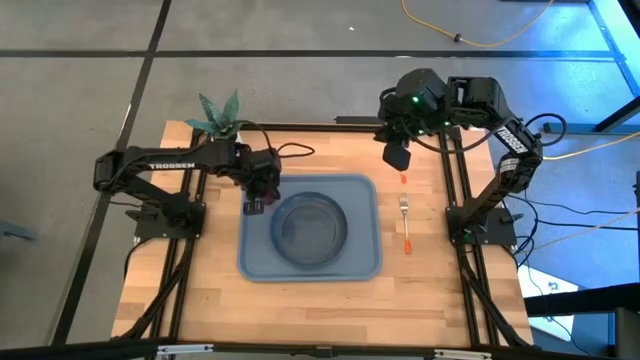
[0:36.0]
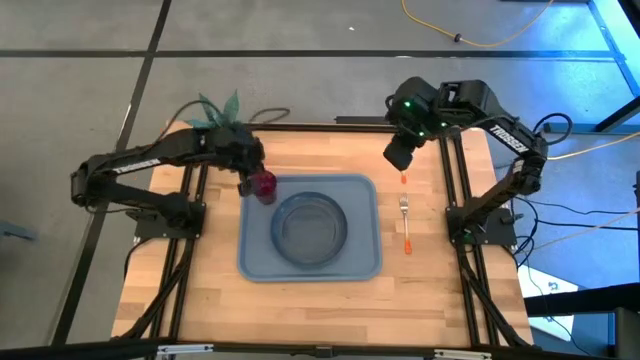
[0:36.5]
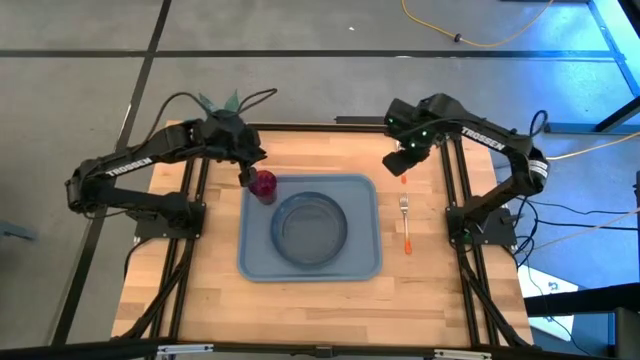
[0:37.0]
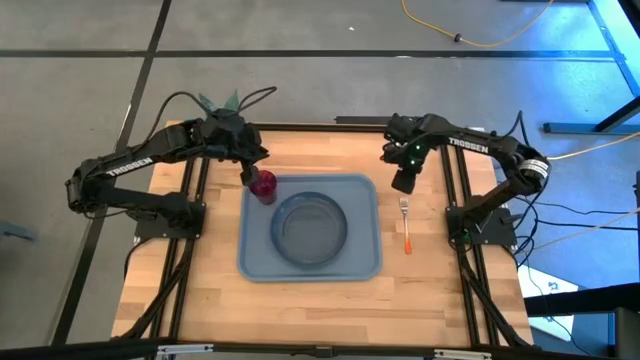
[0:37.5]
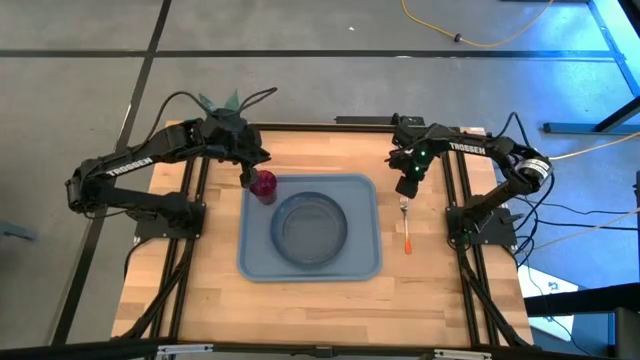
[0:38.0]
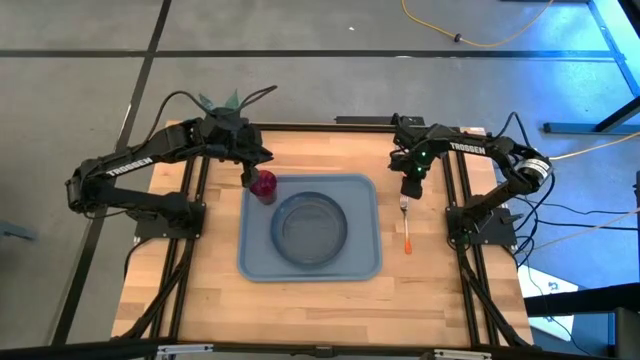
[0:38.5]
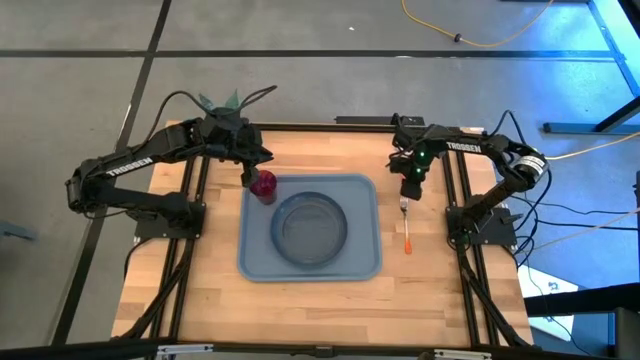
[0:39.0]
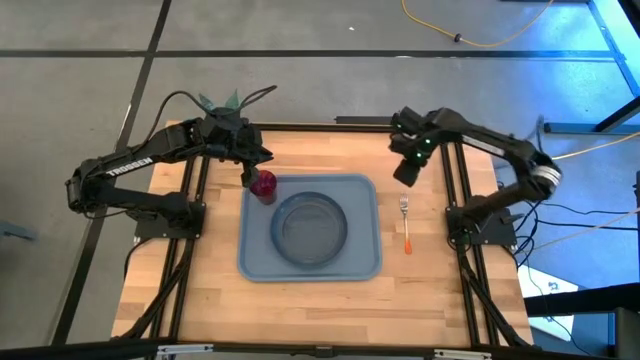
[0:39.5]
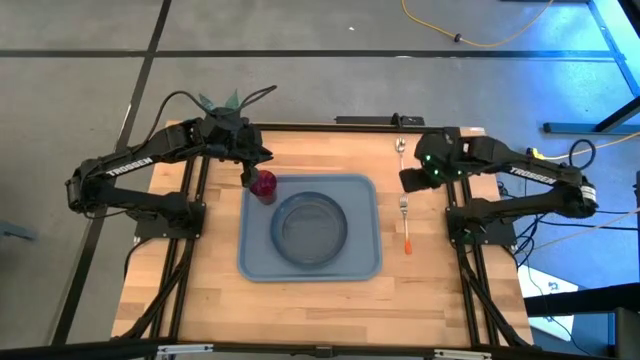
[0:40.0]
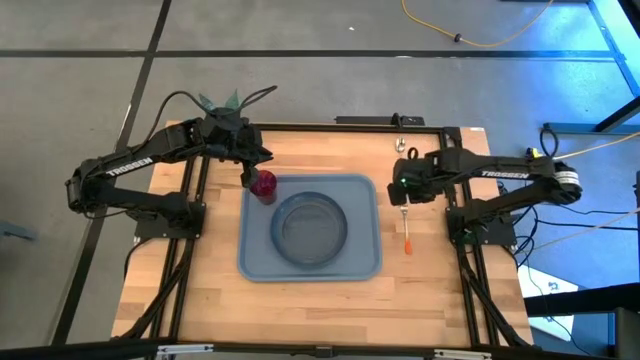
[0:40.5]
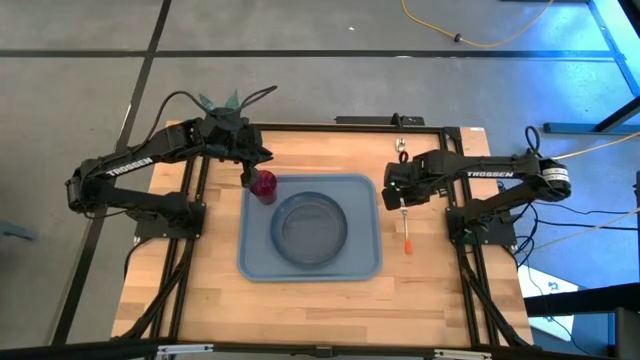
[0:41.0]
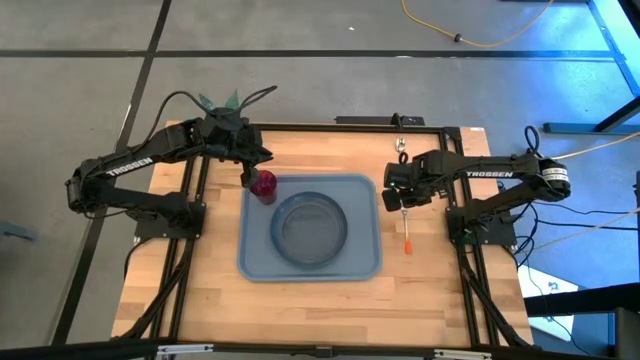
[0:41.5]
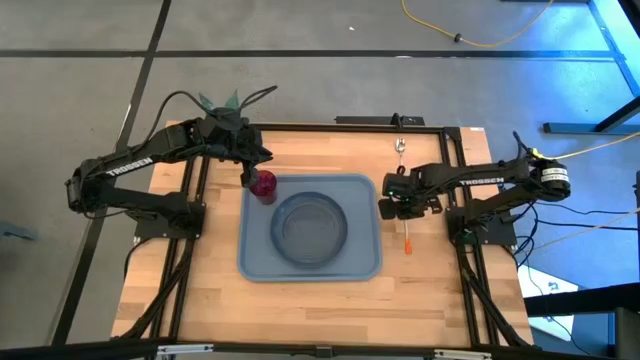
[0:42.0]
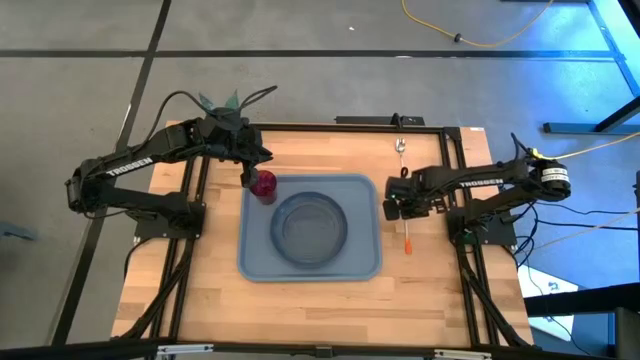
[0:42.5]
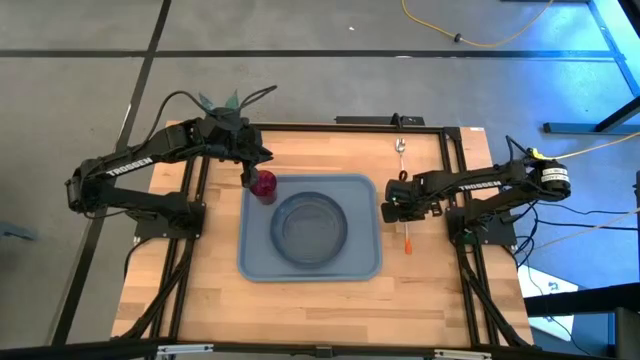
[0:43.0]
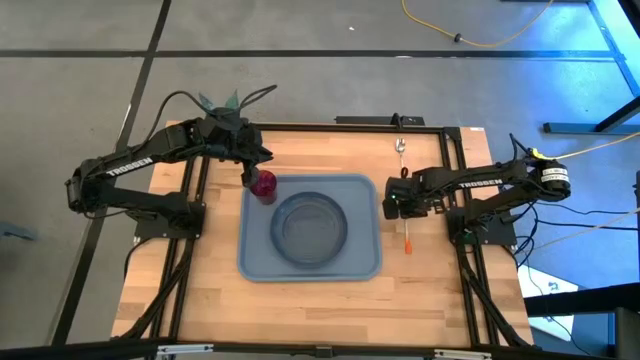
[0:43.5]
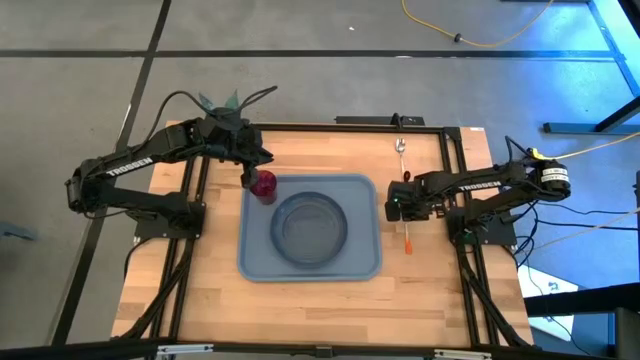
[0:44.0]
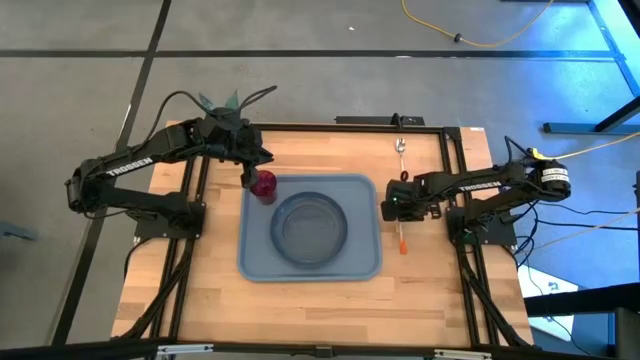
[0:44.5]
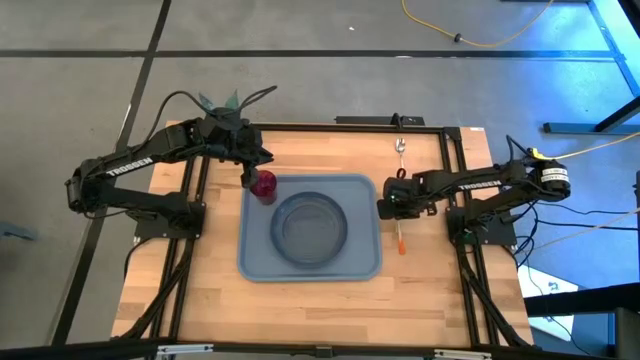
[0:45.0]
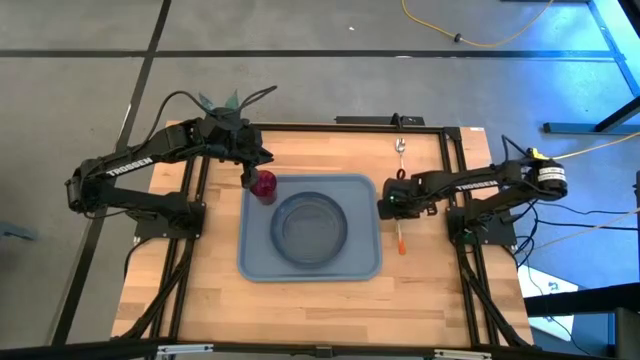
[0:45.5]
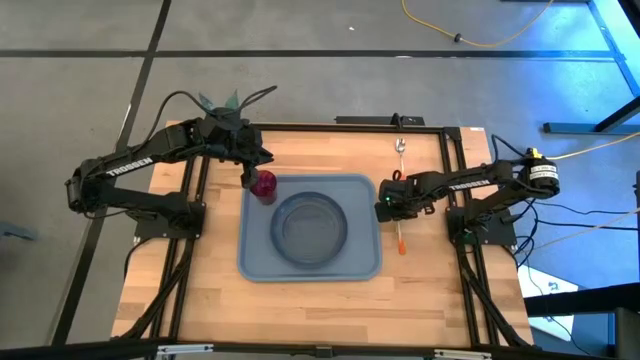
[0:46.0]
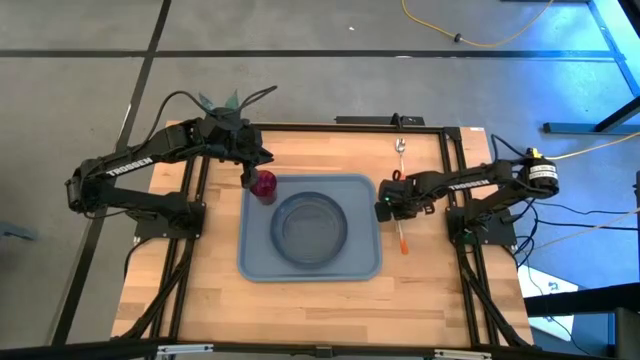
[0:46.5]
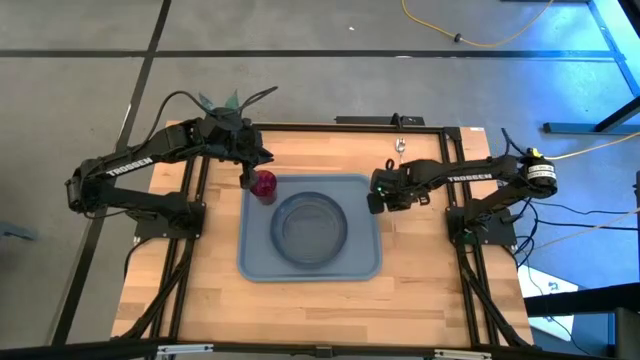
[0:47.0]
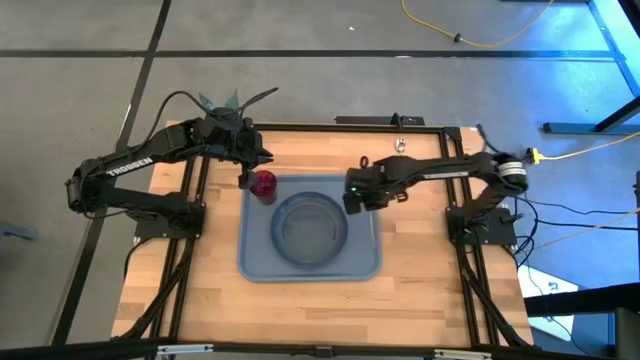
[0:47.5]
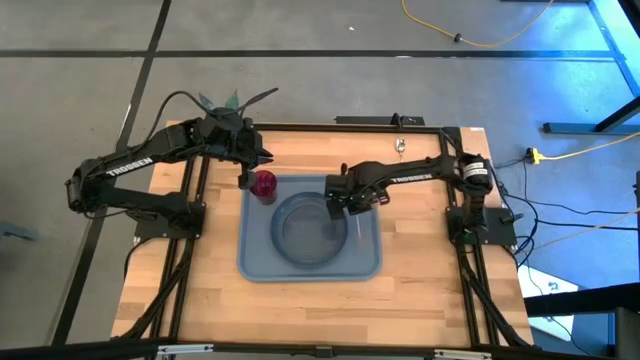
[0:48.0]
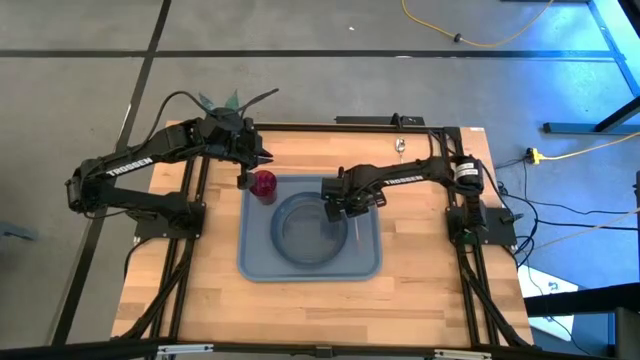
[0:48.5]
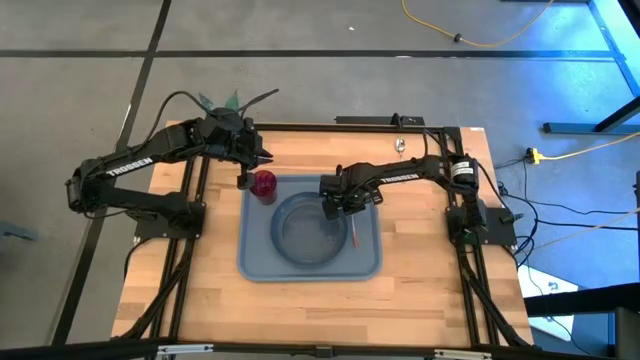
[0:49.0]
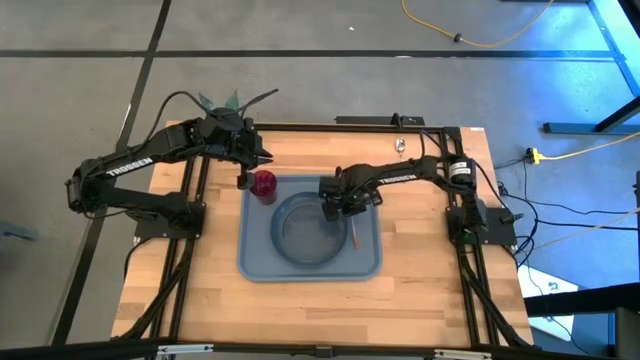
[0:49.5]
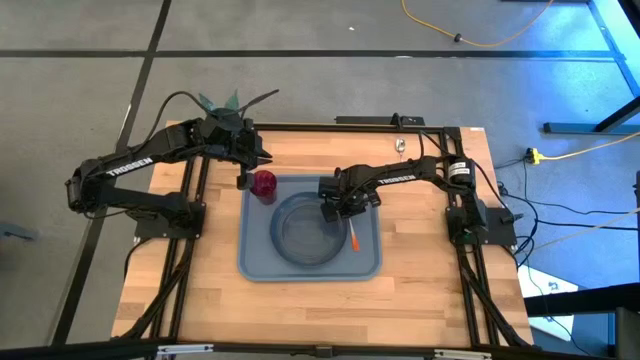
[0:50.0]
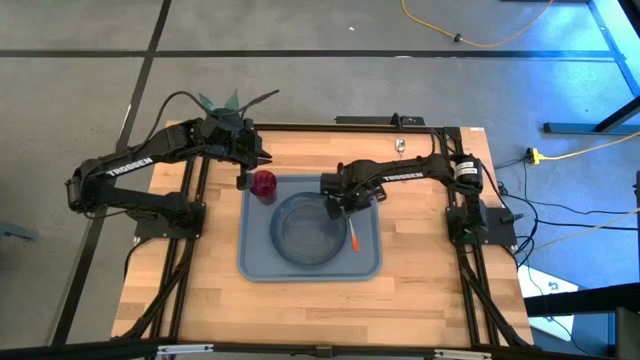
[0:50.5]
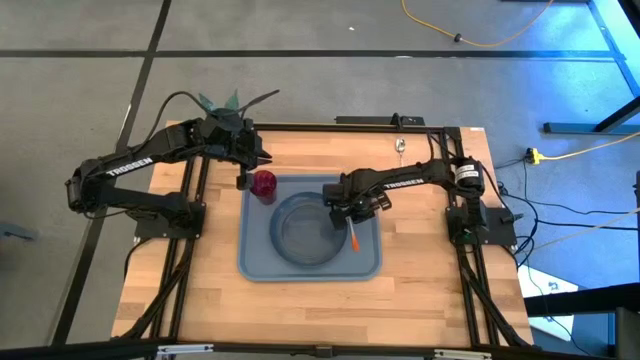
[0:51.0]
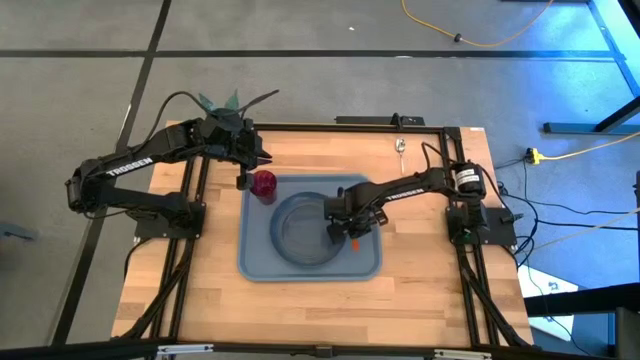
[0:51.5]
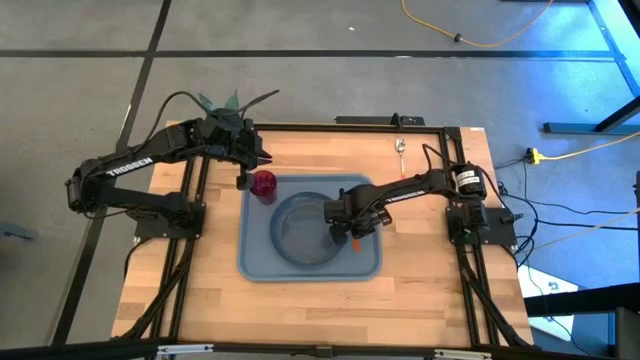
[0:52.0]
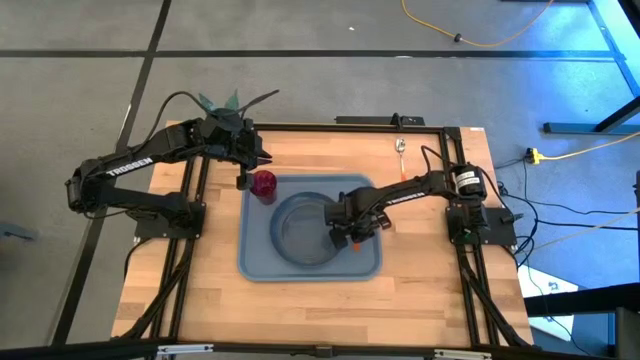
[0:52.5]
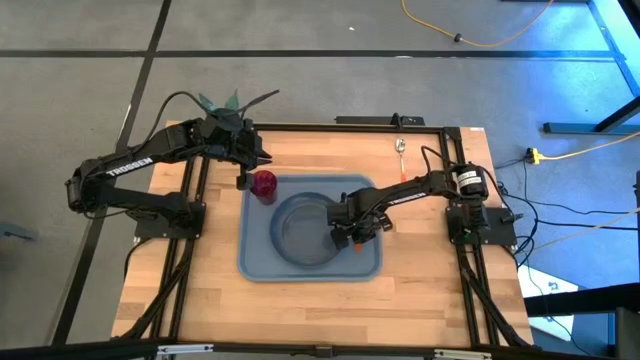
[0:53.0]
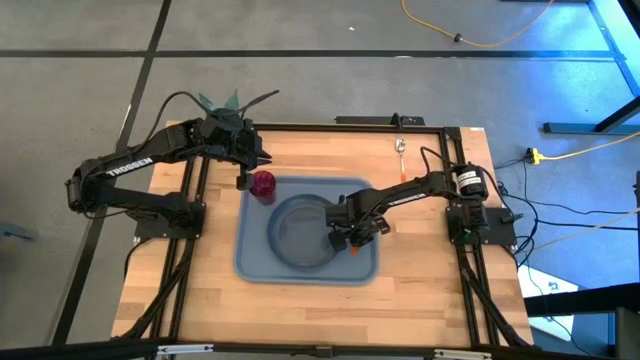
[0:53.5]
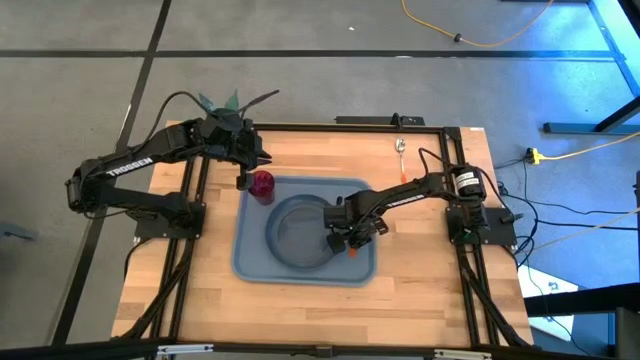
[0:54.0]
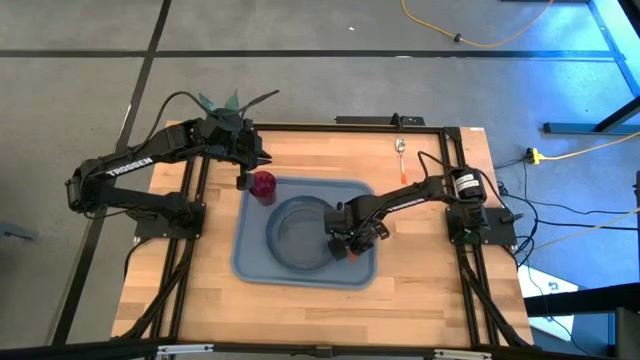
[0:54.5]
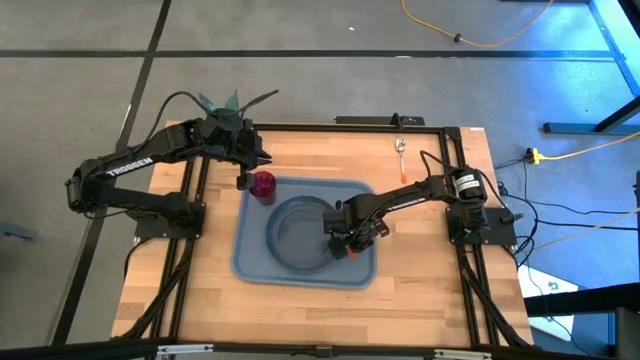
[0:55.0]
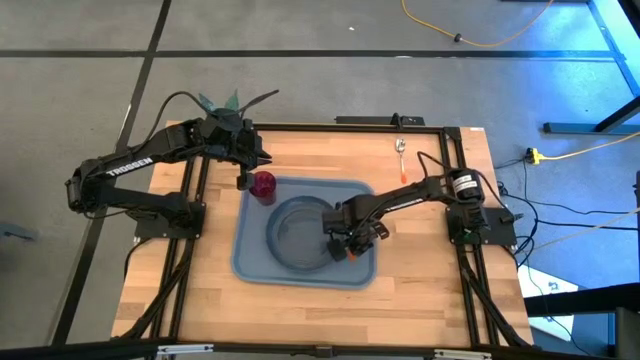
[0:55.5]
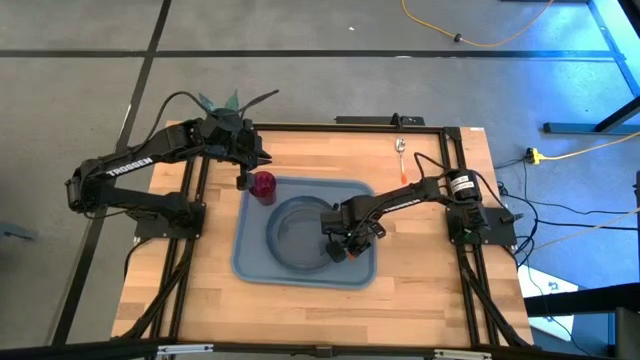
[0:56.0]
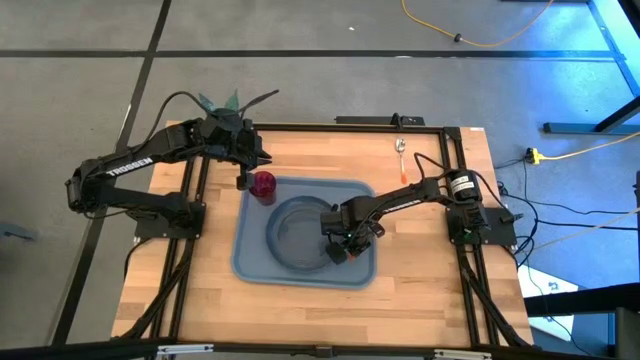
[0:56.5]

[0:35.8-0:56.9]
Task: Pick and place plate/cup/fork/spoon on tray
Put the orange fork on the blue tray to the right of the dark blue plate
